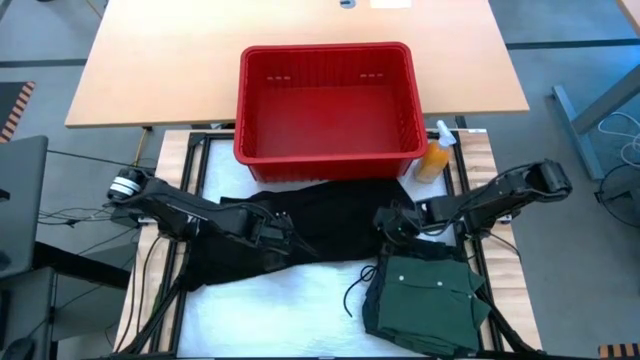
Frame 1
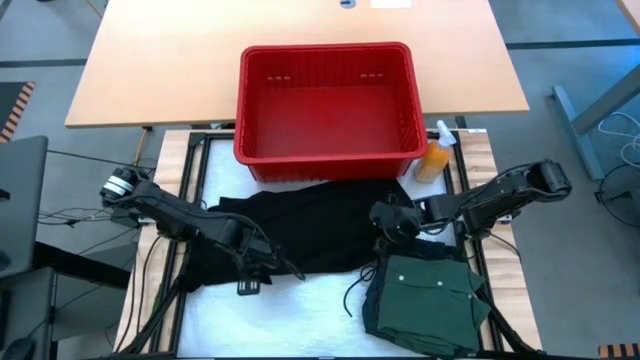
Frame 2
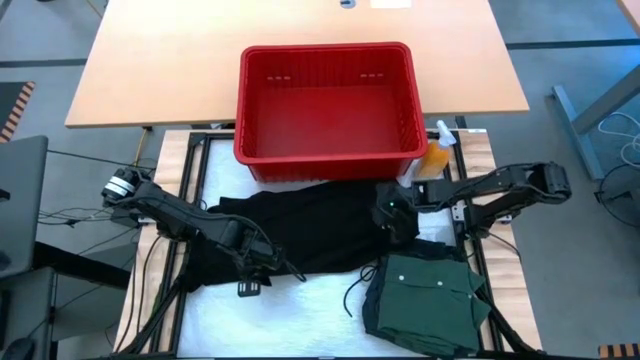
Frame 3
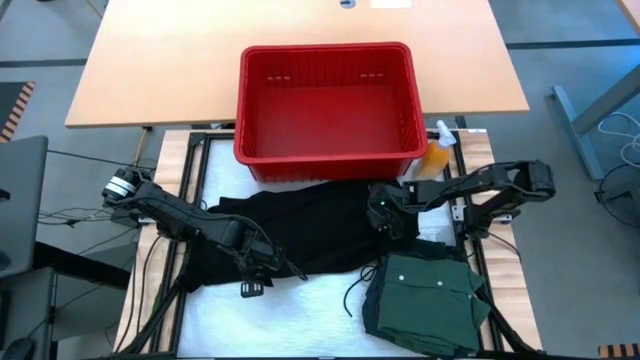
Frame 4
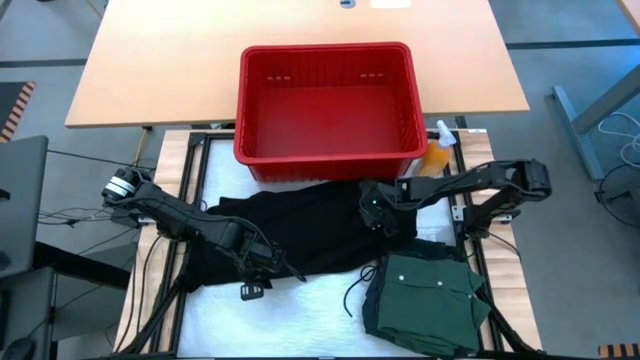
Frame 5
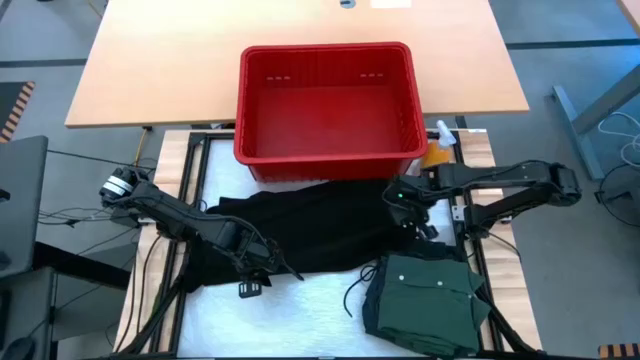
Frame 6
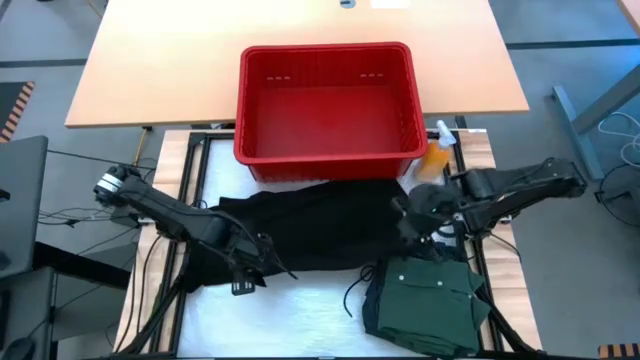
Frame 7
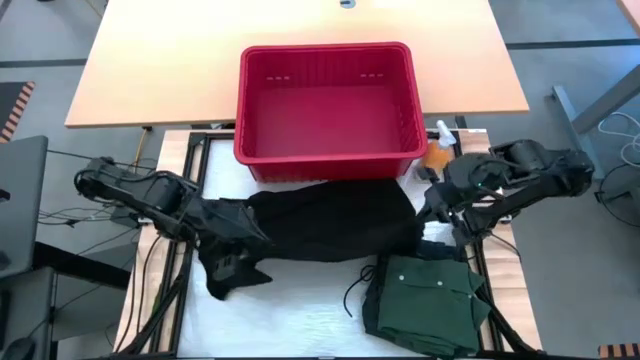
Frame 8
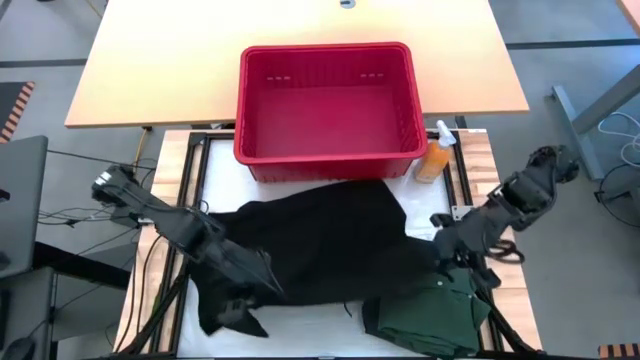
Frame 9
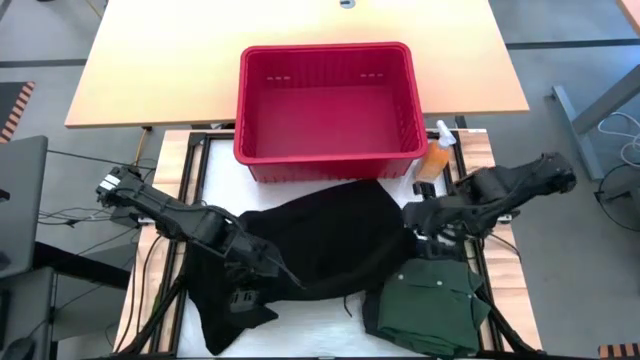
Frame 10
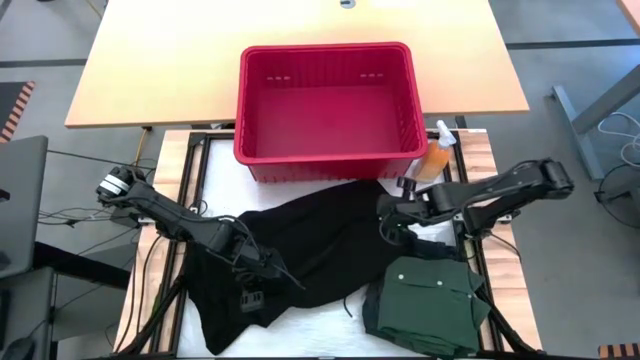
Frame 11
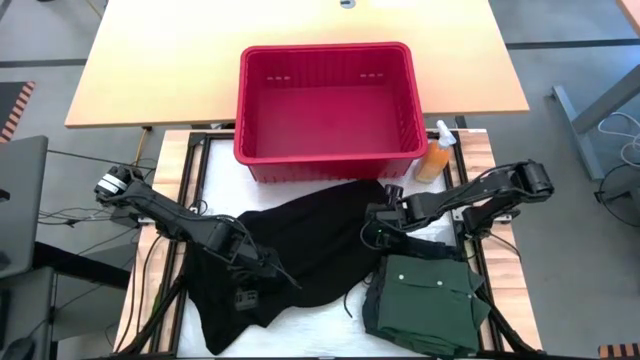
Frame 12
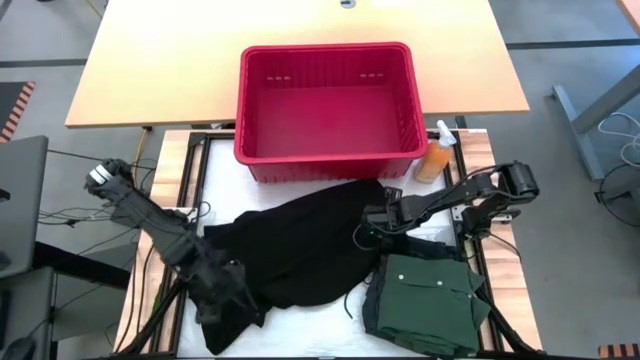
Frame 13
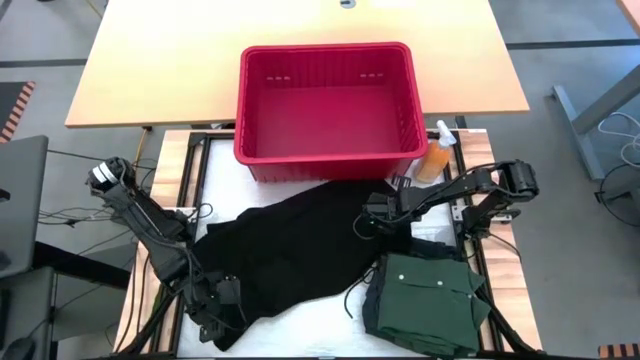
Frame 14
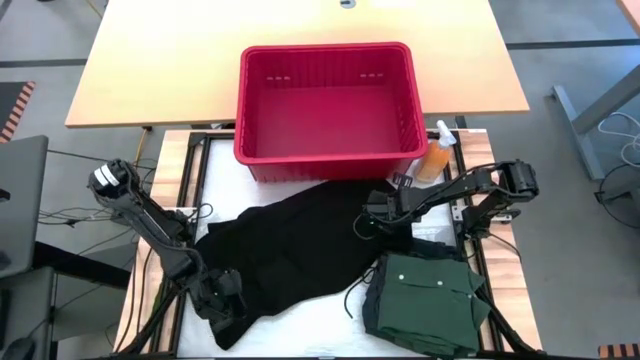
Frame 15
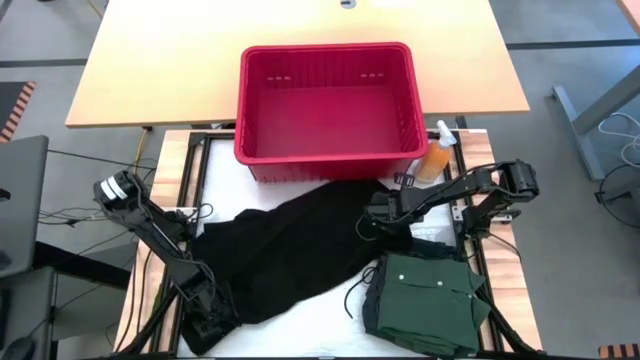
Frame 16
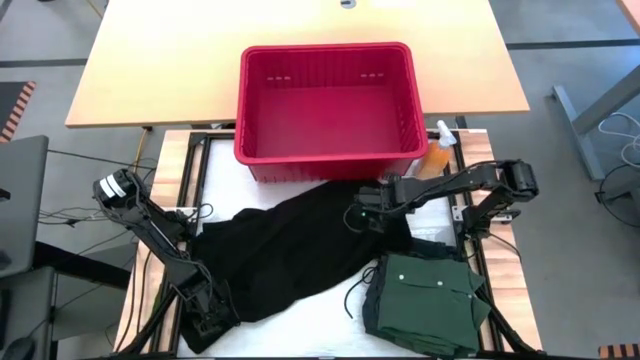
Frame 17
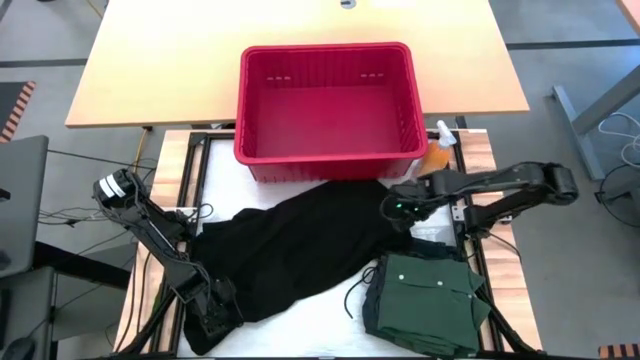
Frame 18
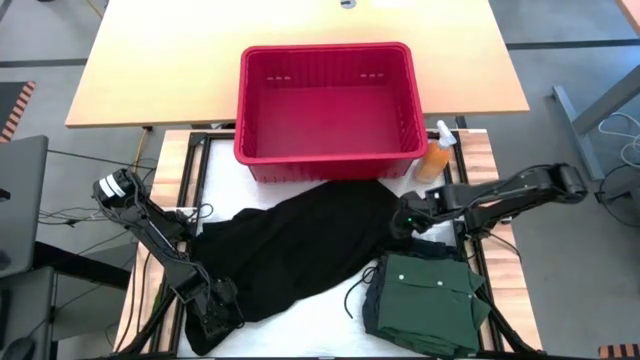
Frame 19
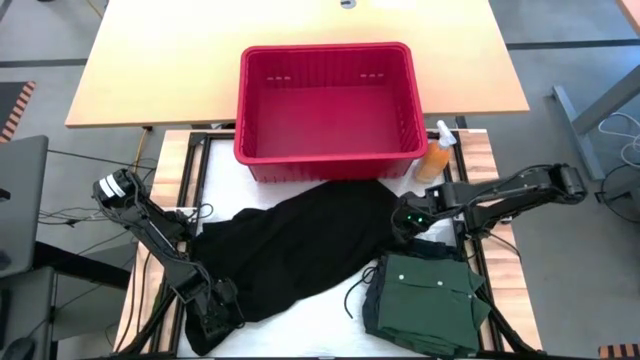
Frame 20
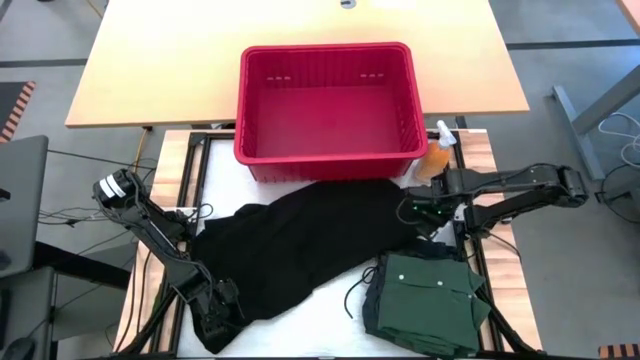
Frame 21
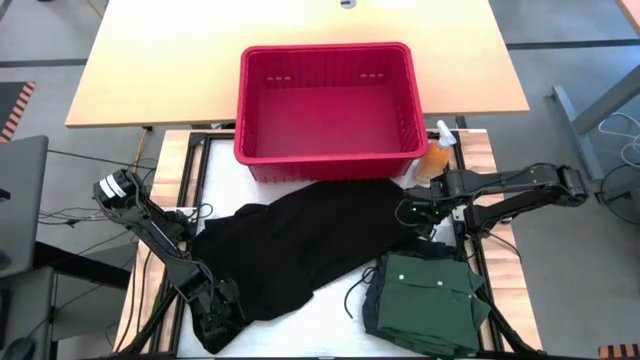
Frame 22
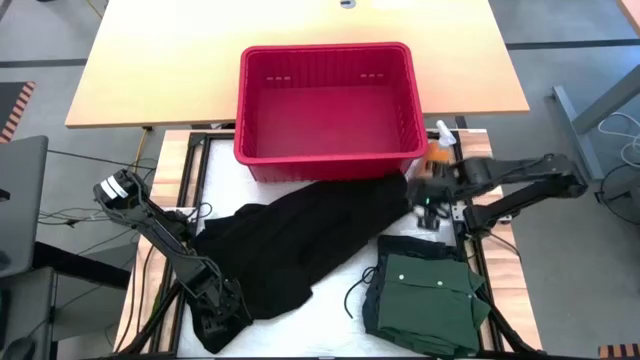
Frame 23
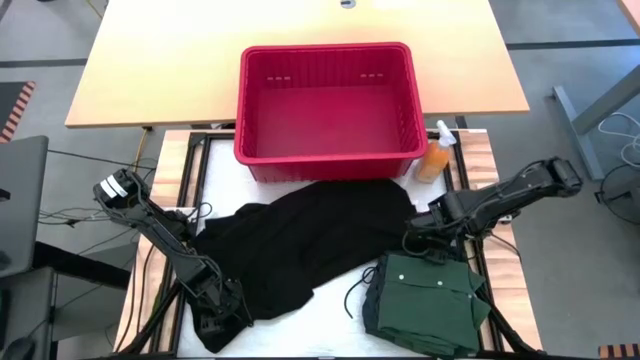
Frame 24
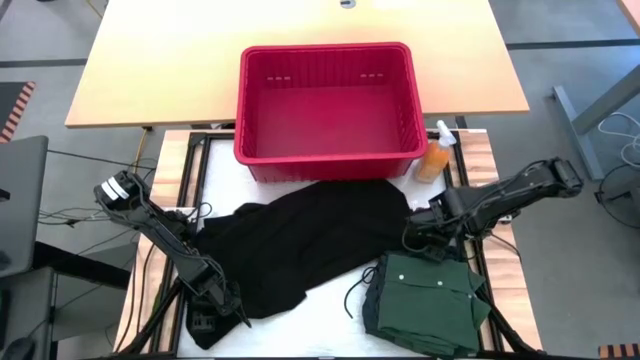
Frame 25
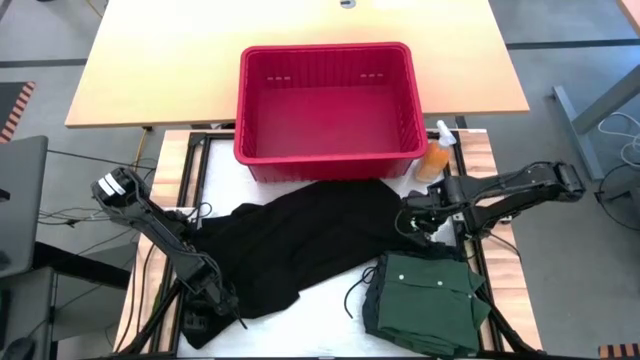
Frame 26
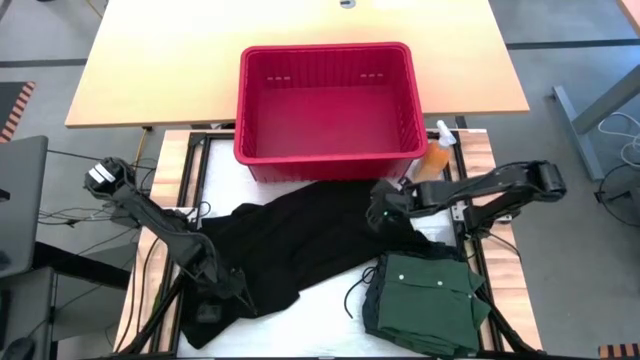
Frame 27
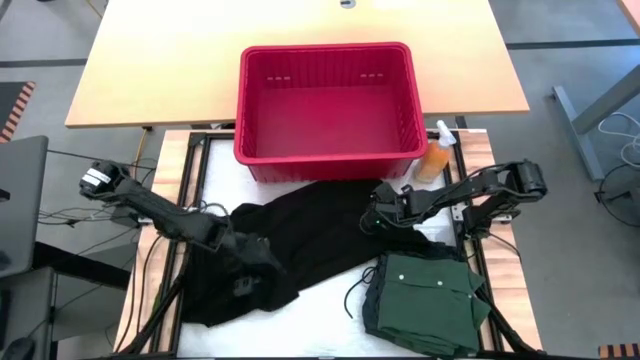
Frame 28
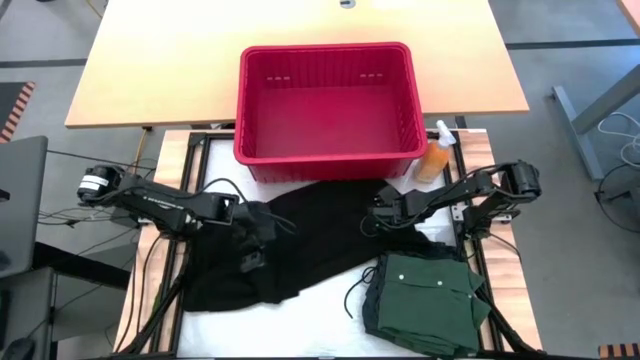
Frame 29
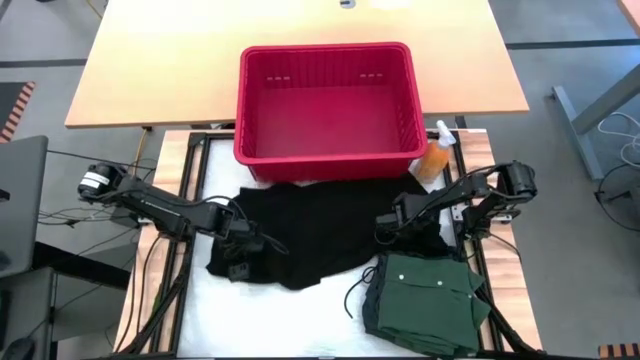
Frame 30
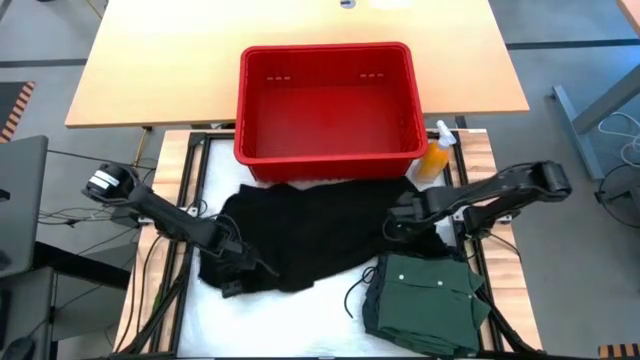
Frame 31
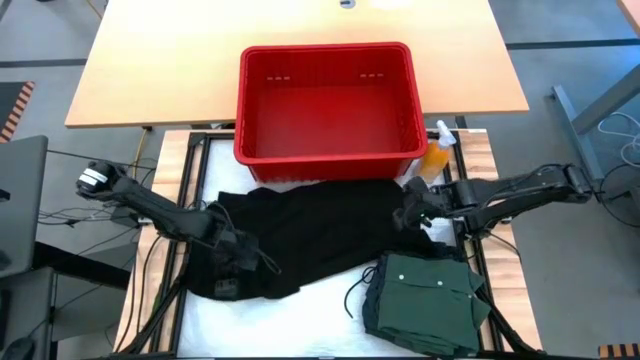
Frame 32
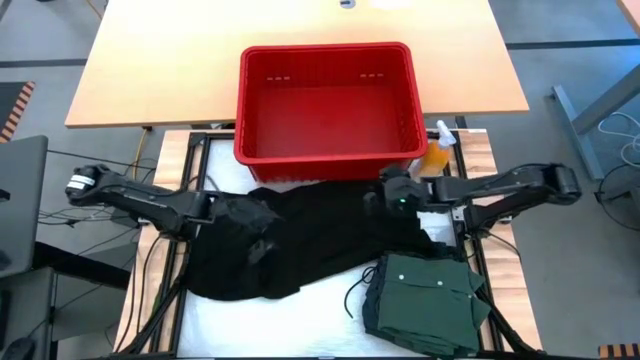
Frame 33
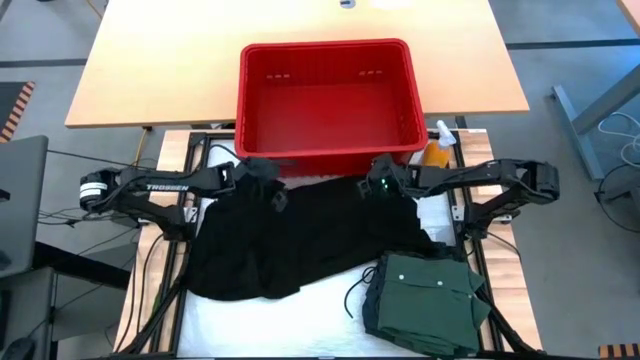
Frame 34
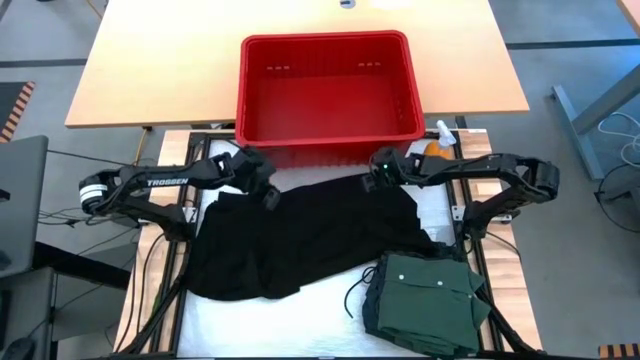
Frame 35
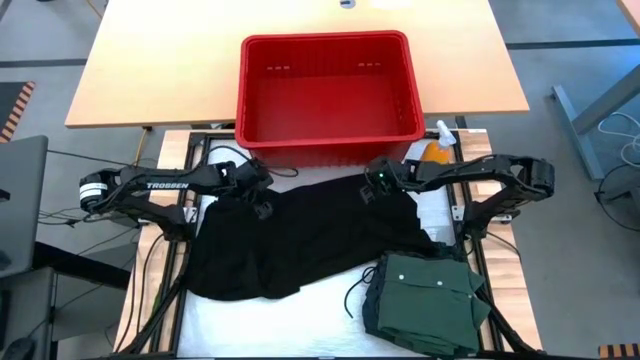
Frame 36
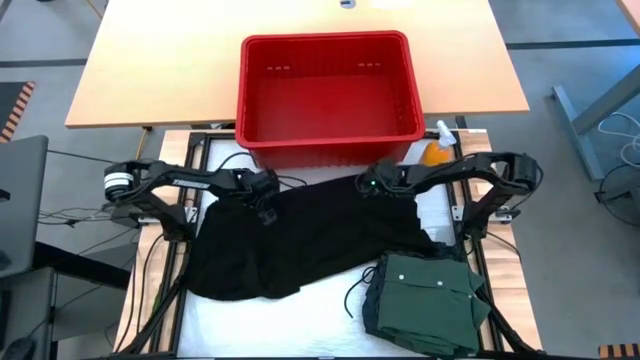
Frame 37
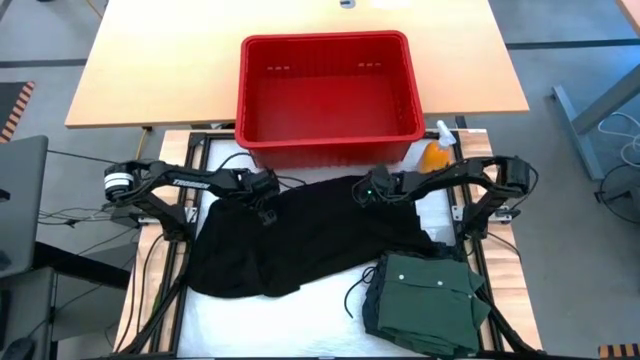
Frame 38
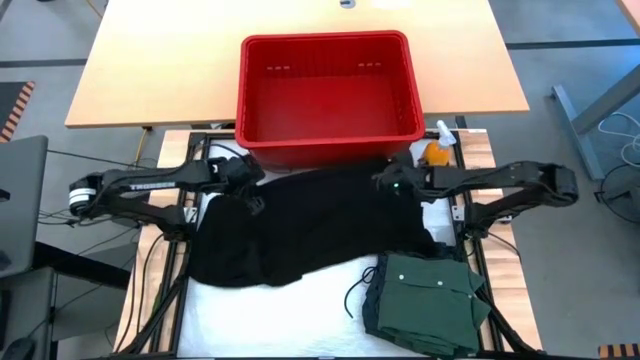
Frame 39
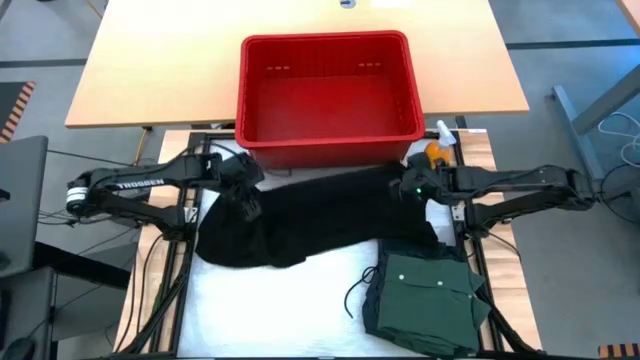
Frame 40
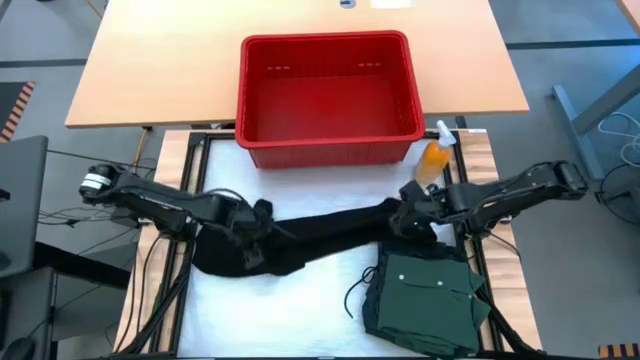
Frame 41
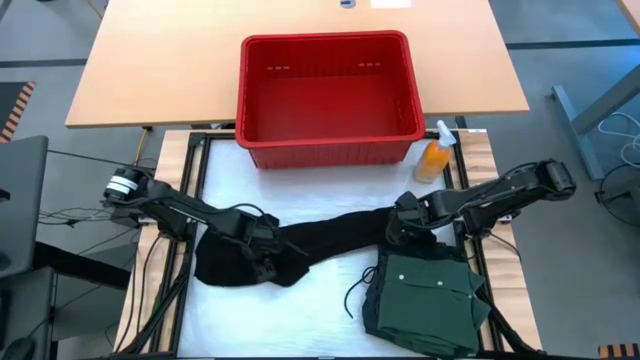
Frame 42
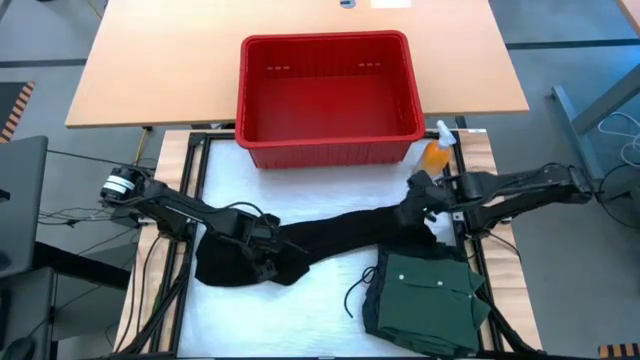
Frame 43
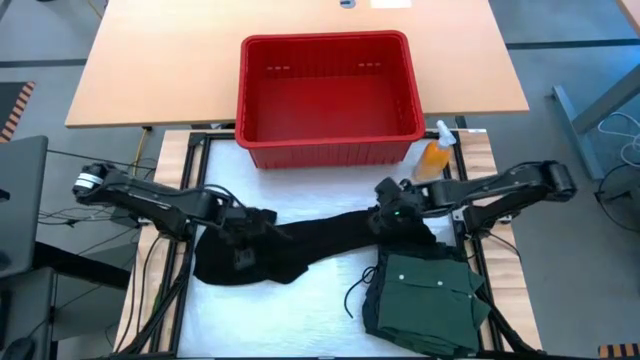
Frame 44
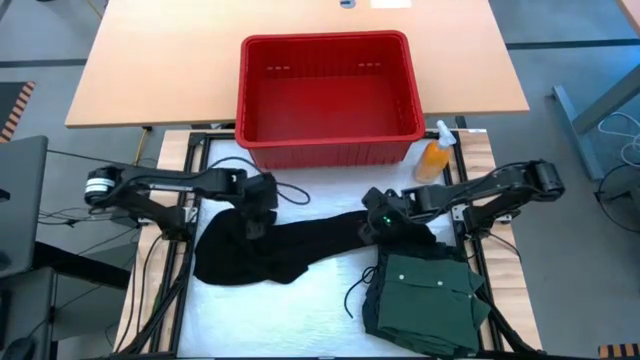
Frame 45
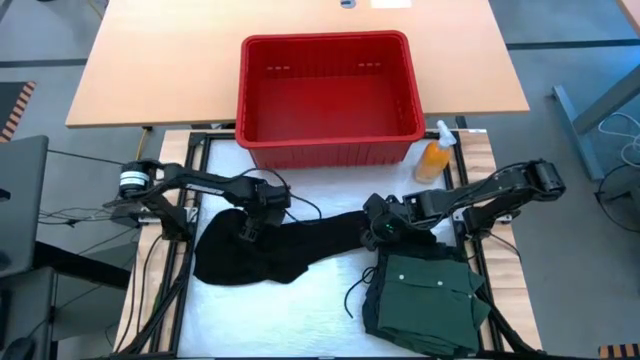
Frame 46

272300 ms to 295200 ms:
Task: Fold laundry
Fold the black shirt
